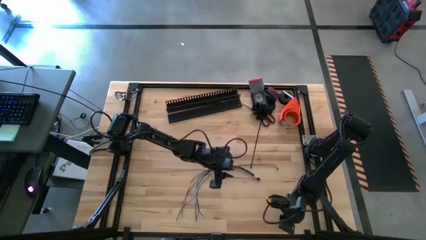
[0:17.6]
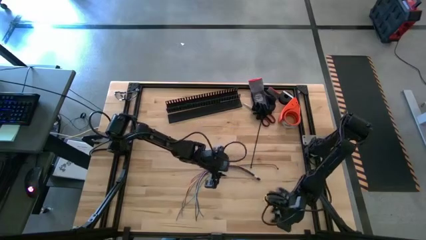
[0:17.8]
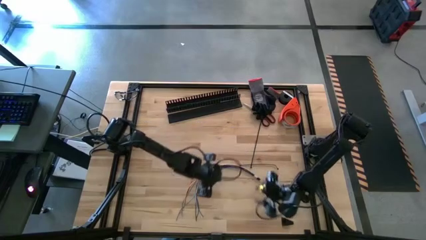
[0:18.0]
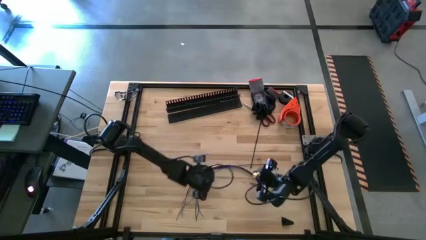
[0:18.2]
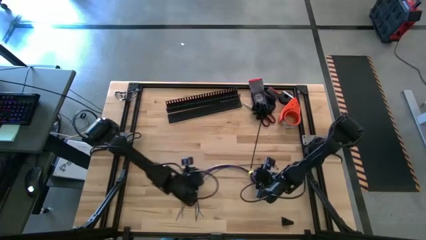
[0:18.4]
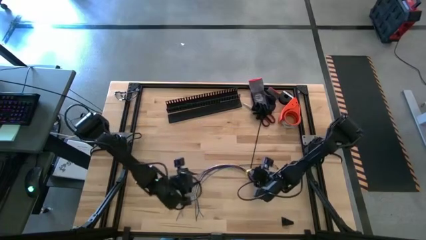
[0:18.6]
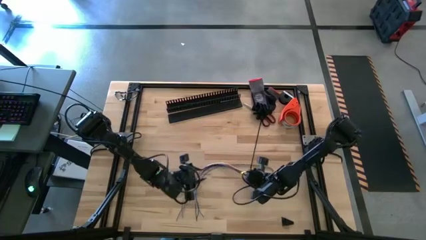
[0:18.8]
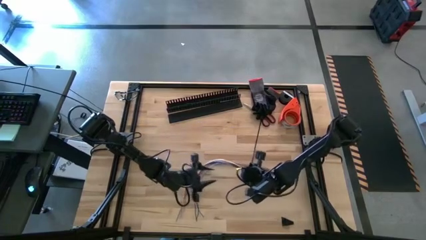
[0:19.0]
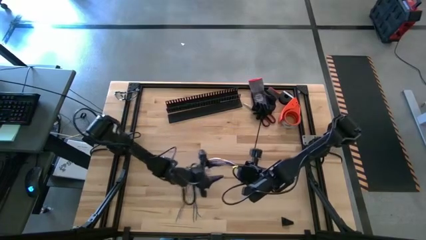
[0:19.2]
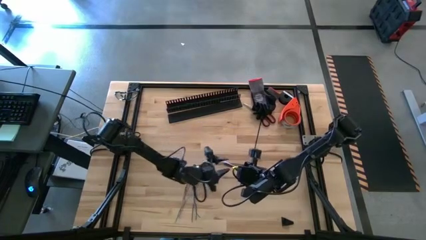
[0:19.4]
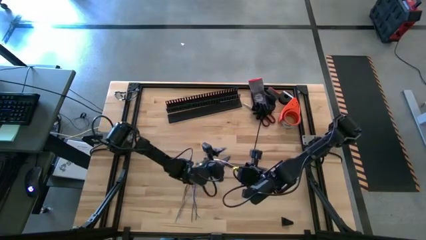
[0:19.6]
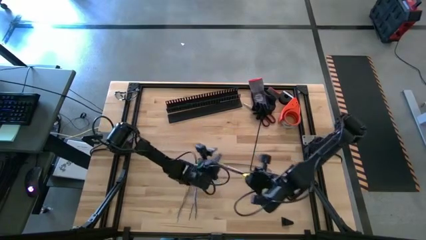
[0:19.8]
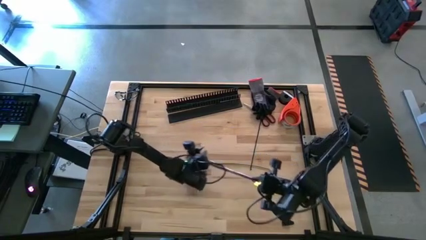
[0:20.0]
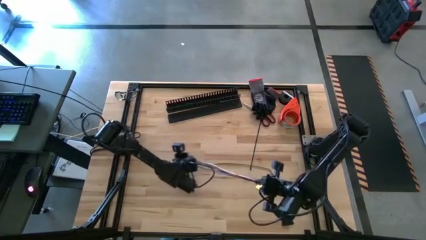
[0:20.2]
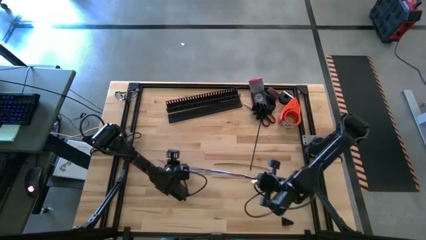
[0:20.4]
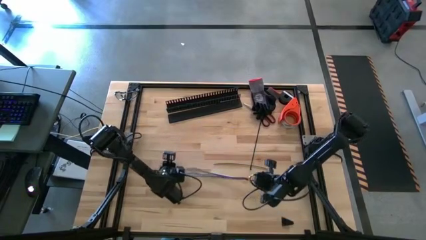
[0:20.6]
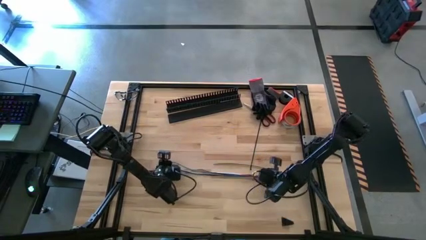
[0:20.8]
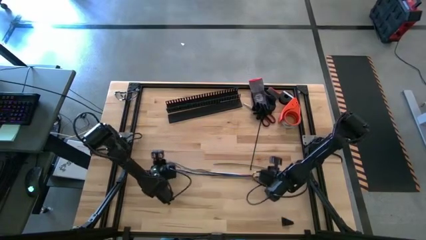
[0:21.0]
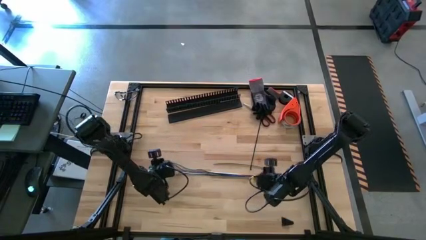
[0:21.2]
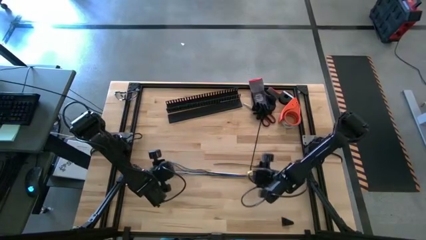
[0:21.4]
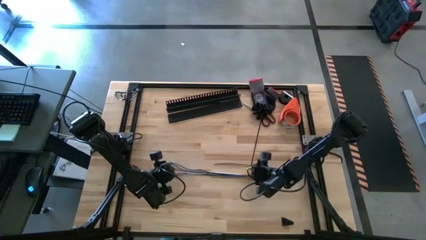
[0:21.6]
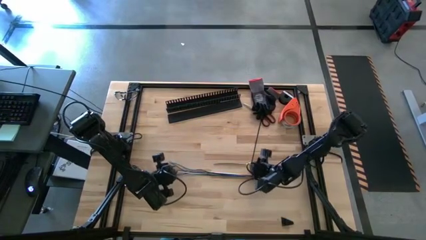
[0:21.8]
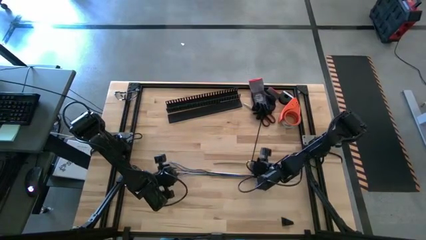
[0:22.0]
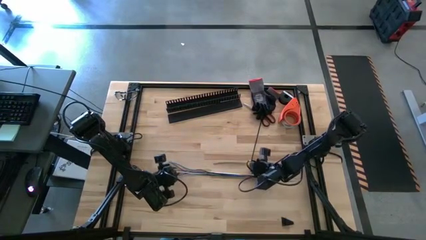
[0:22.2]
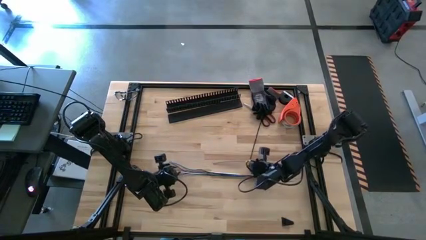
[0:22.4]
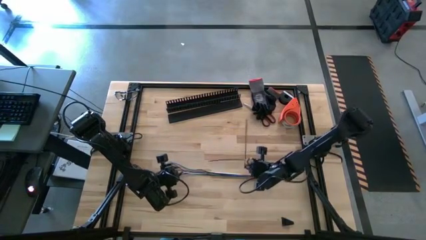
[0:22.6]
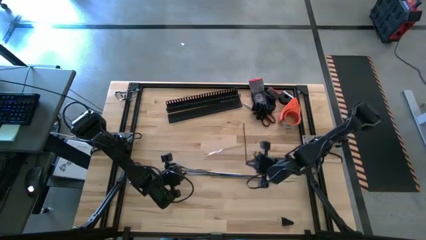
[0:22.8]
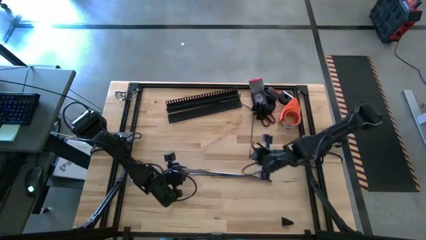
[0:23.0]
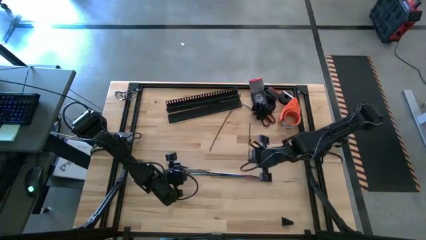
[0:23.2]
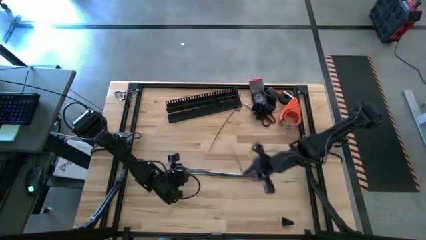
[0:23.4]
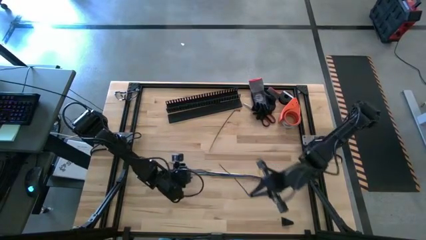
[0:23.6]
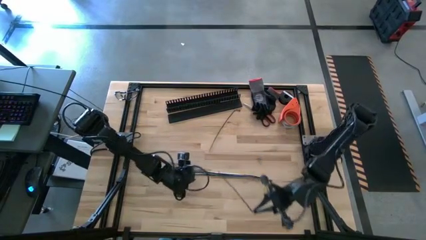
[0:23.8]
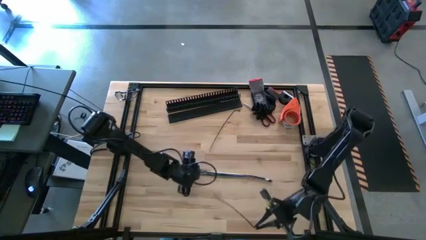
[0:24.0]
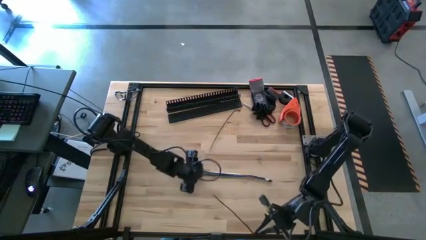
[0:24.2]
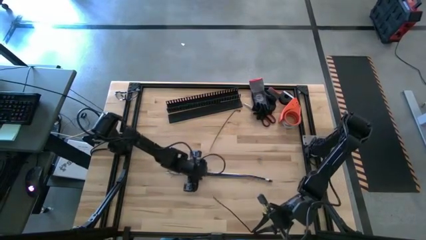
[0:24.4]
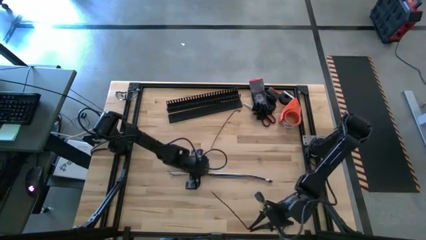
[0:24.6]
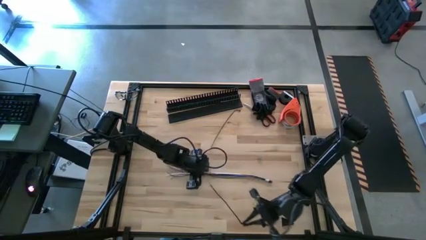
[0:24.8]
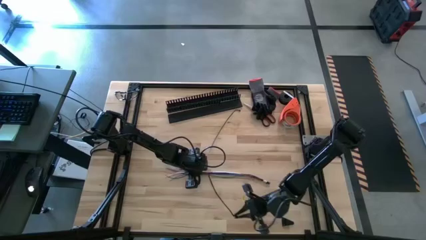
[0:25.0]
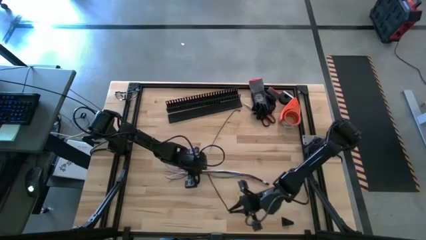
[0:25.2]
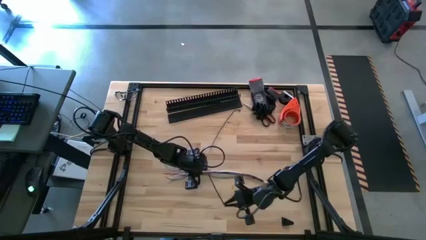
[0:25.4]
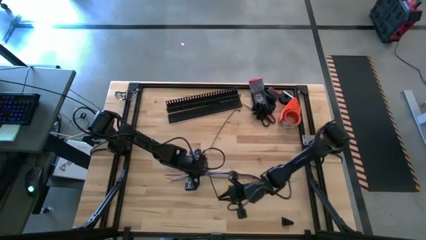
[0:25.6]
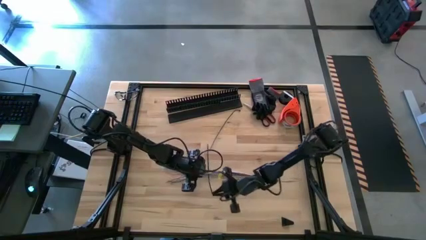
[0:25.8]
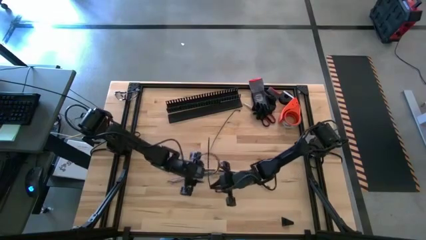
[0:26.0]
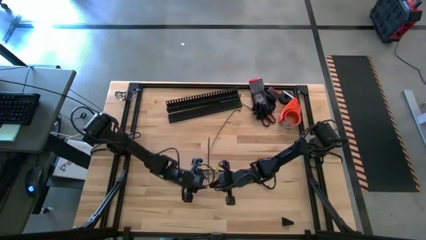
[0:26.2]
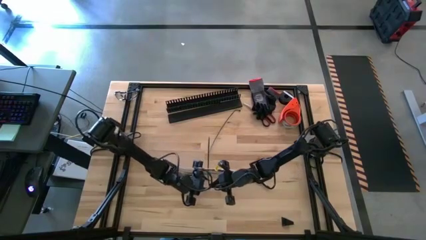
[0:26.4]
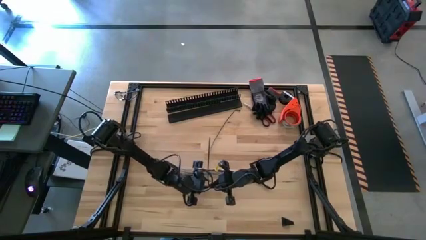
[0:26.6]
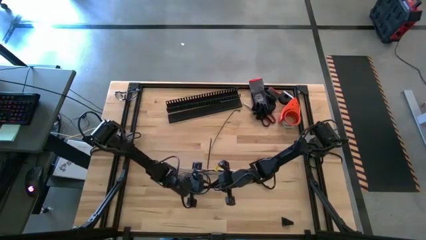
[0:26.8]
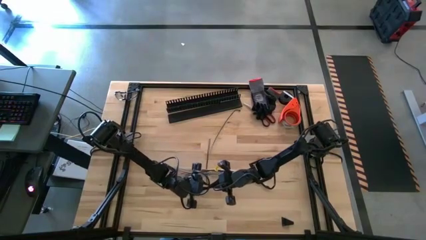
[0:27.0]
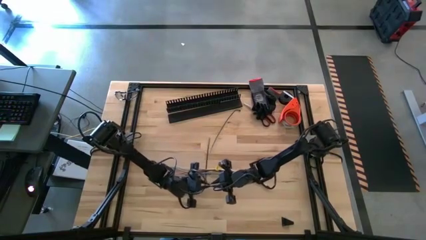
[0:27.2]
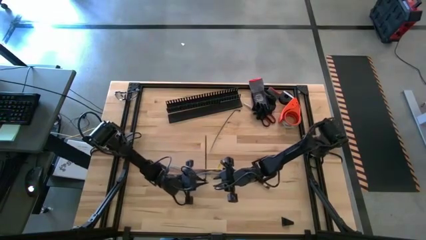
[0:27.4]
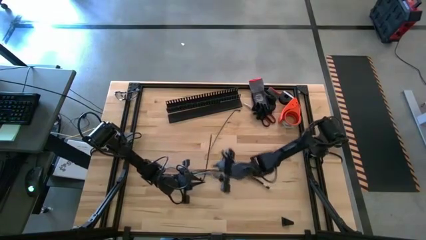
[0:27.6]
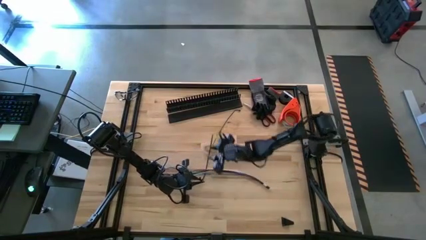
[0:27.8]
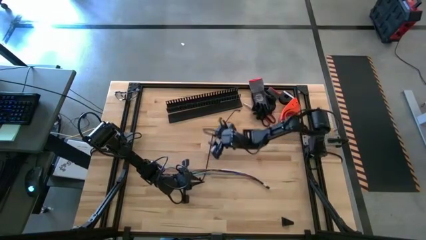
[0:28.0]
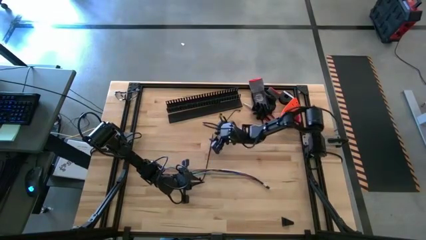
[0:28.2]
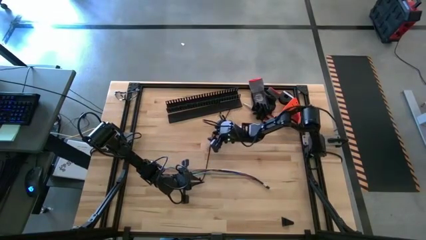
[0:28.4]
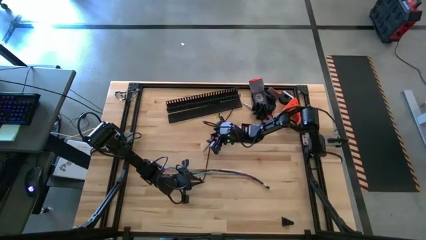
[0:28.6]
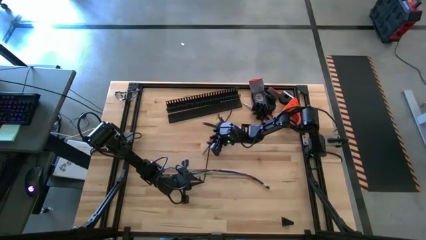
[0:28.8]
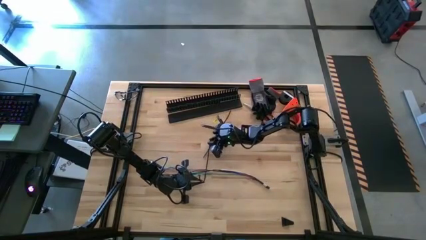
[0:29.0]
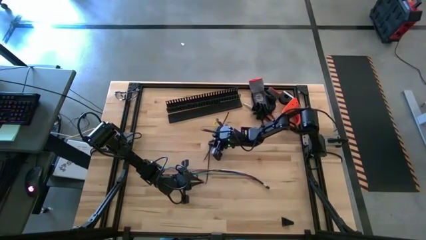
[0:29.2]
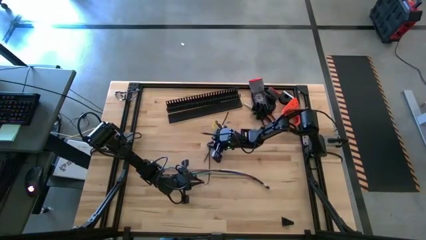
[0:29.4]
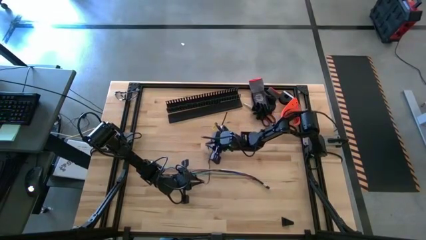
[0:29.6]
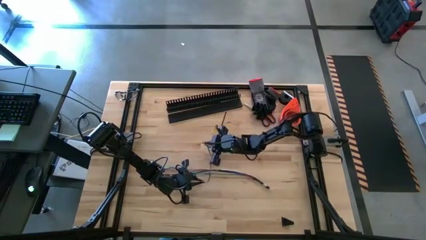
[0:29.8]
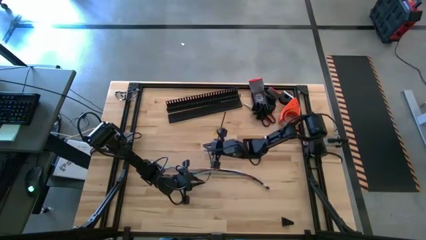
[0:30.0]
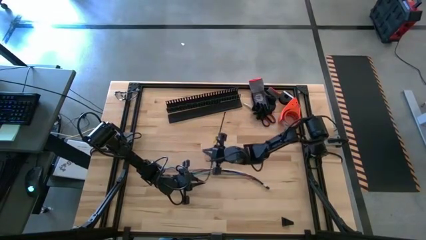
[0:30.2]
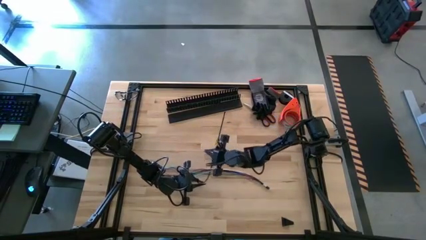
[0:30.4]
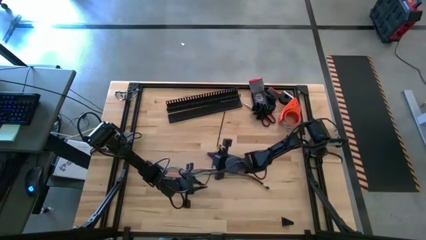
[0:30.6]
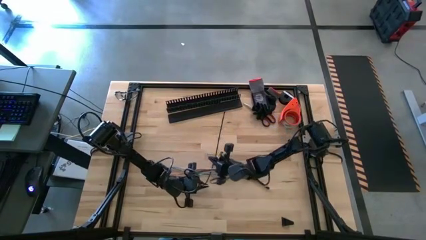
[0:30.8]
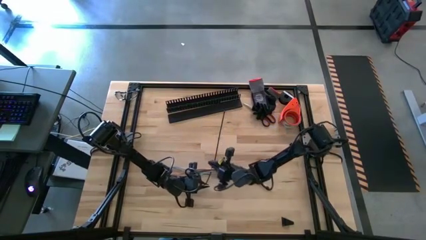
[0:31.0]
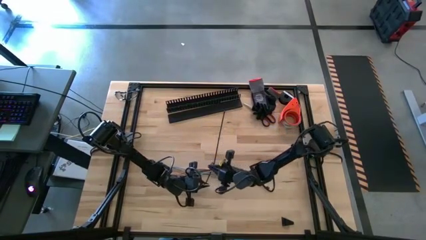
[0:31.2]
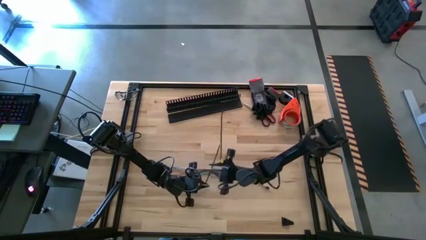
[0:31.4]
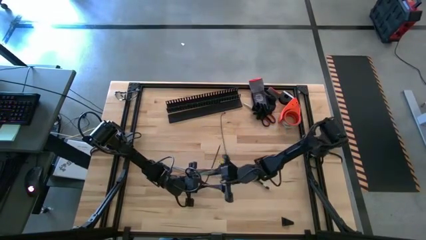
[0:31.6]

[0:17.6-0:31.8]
Task: Ziptie cables
Wrap the top black zip tie around the colored cable bundle
